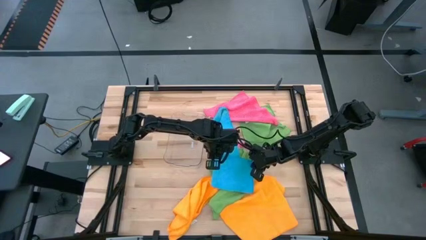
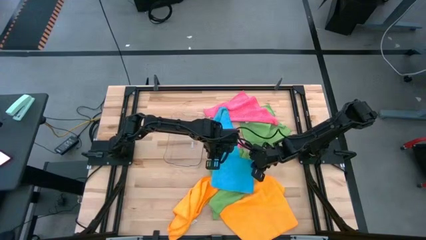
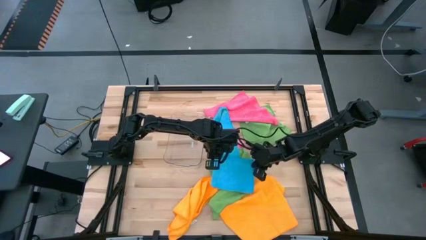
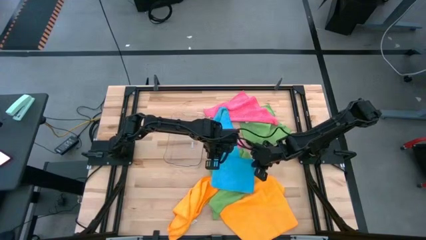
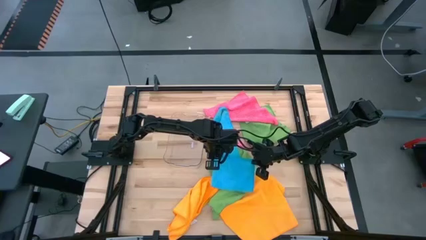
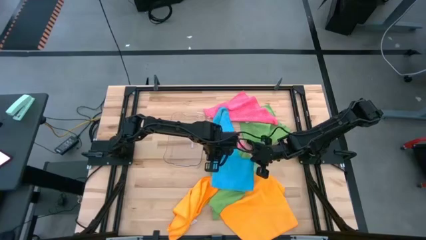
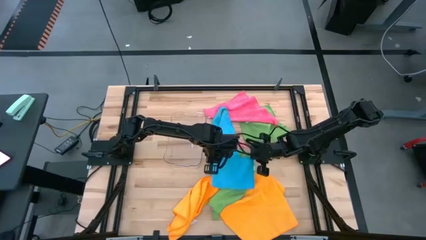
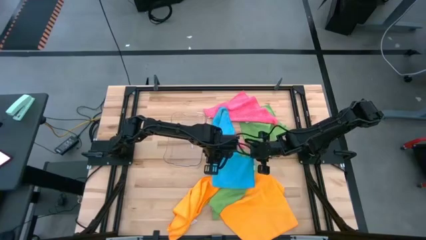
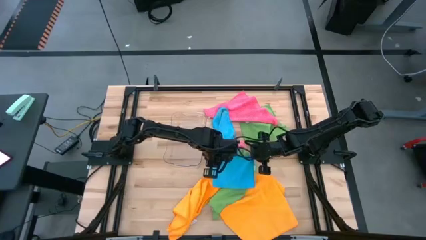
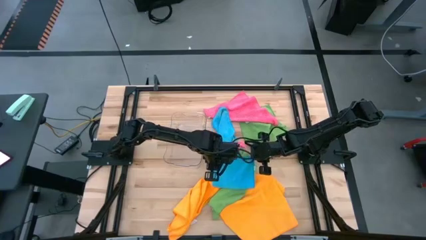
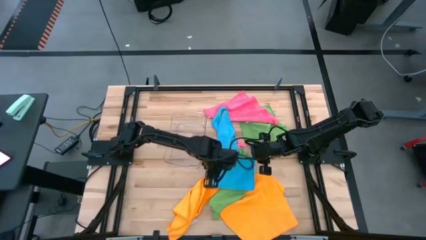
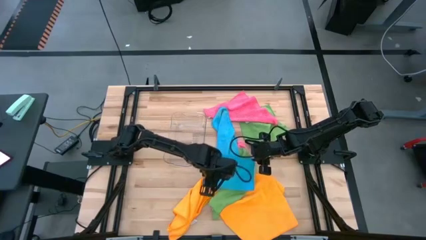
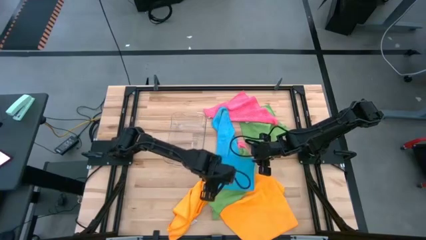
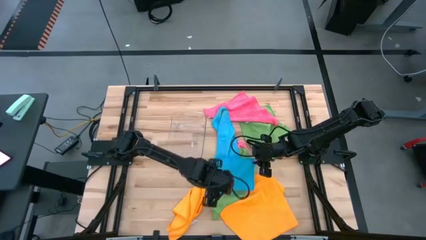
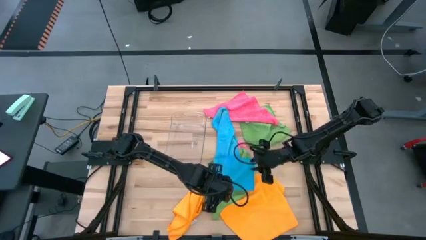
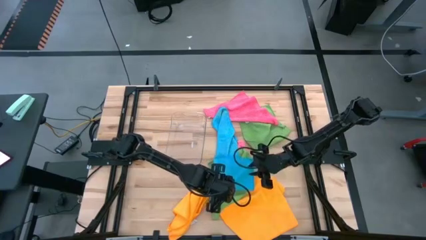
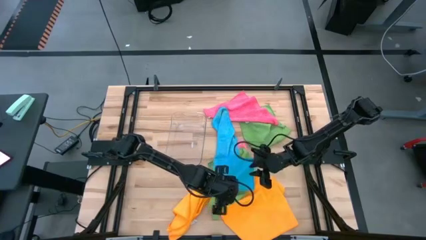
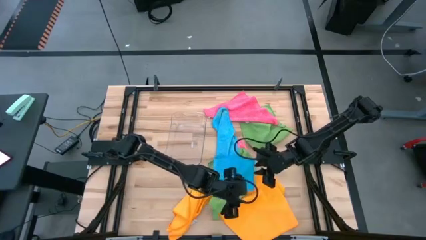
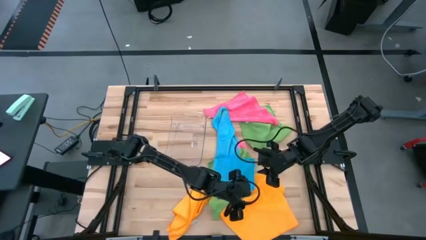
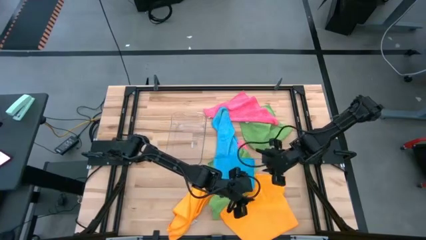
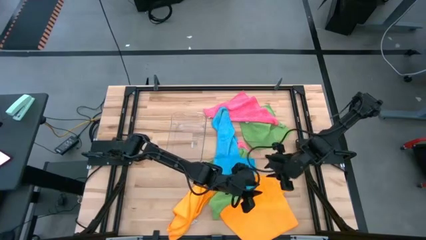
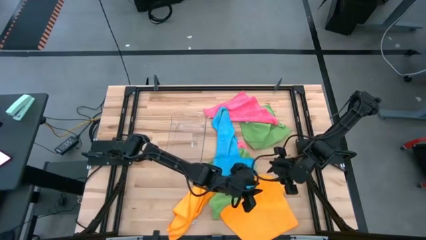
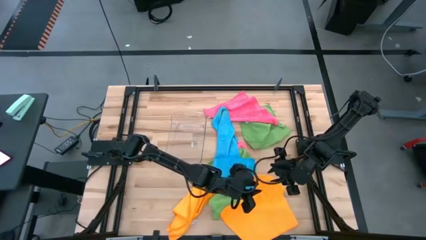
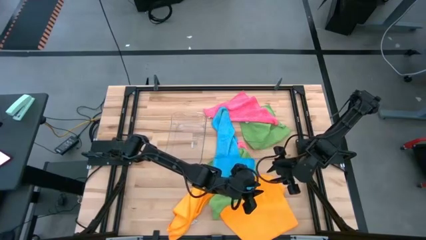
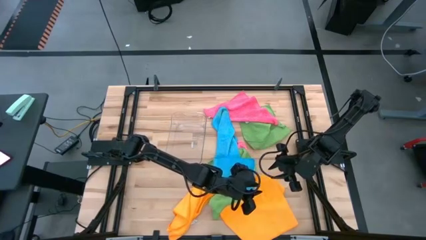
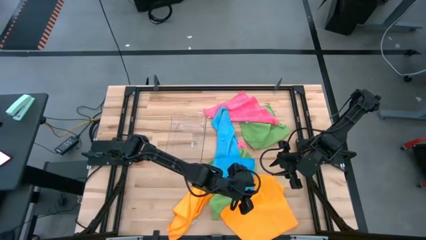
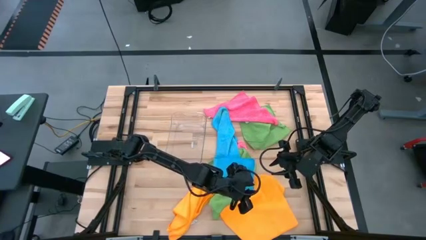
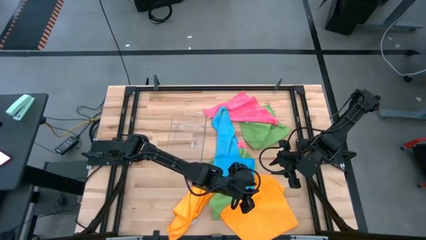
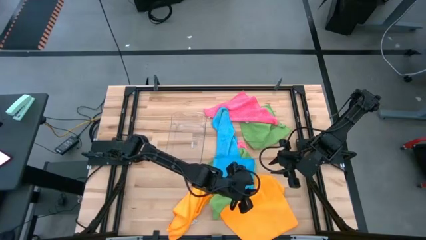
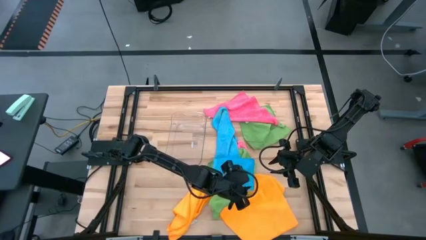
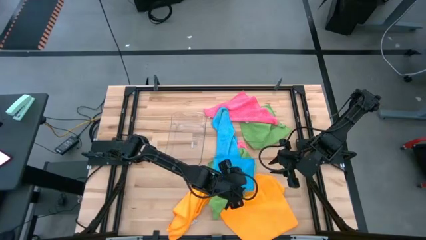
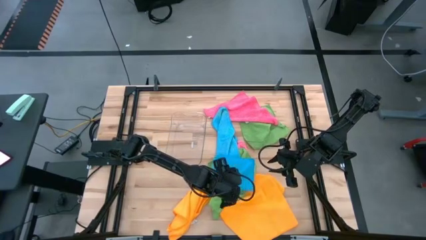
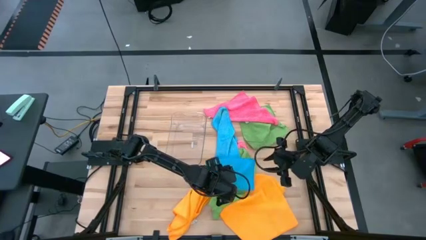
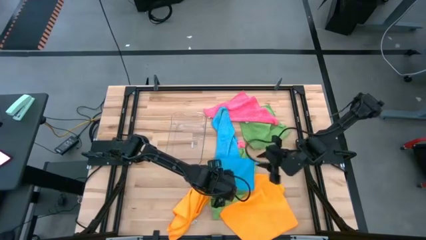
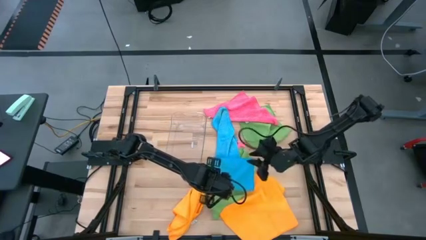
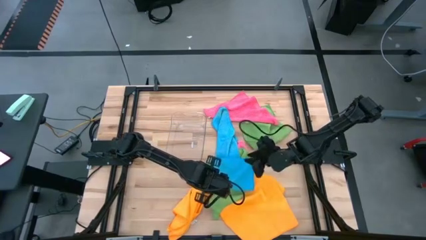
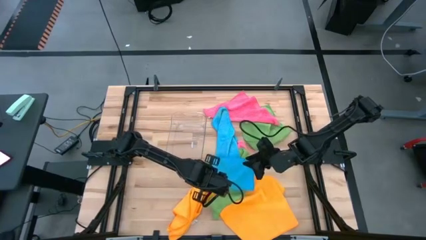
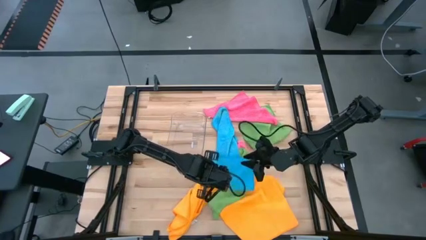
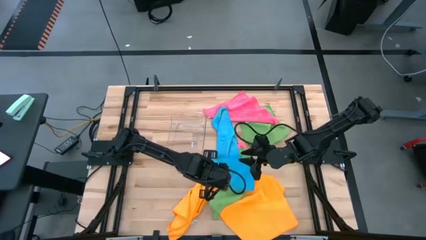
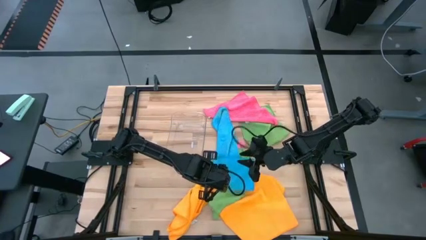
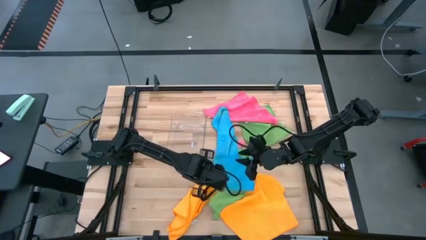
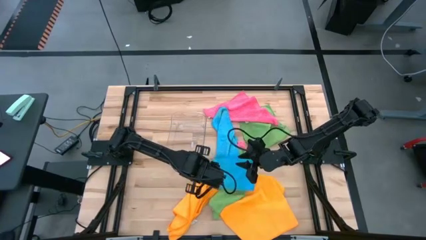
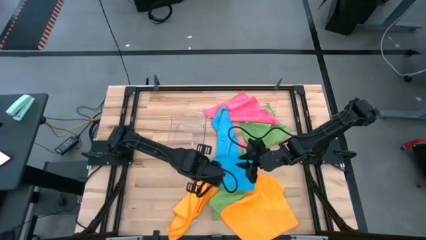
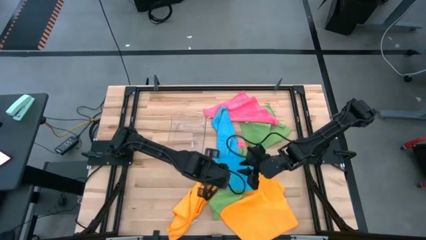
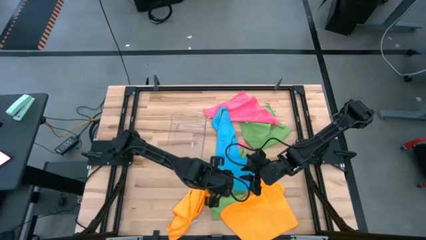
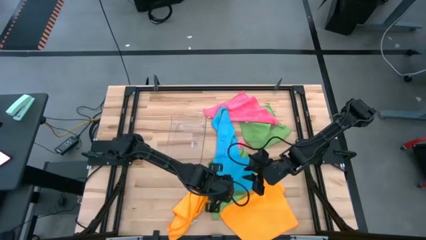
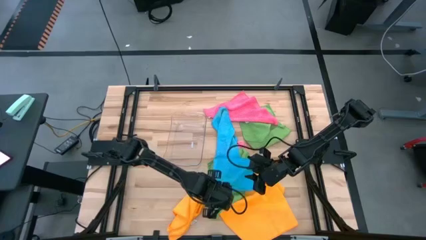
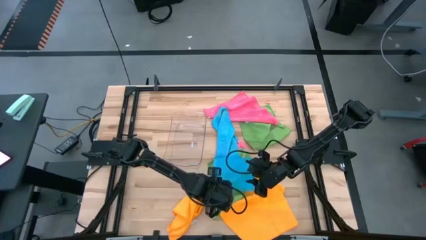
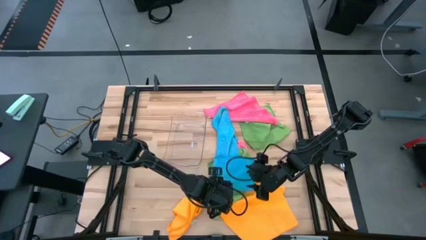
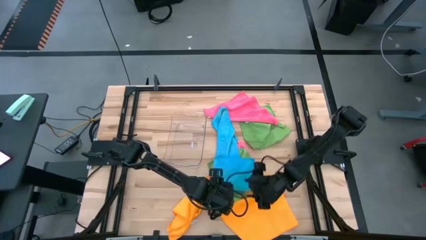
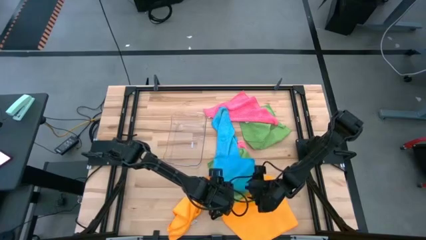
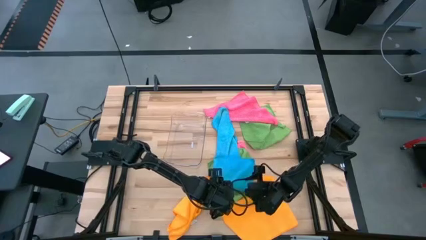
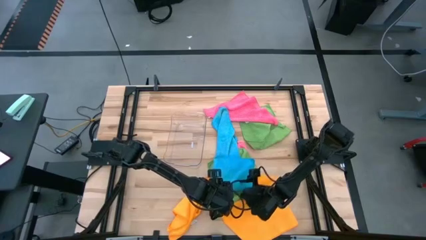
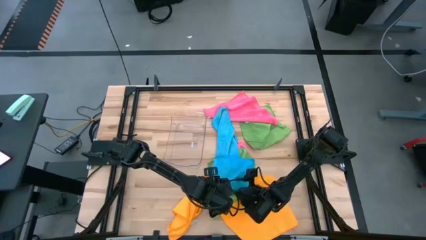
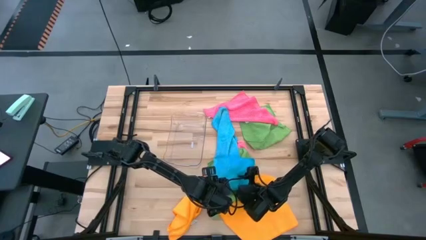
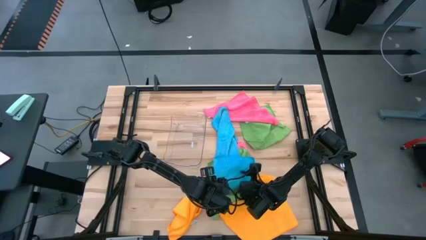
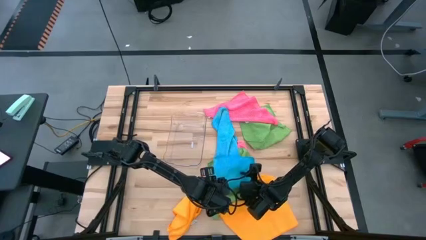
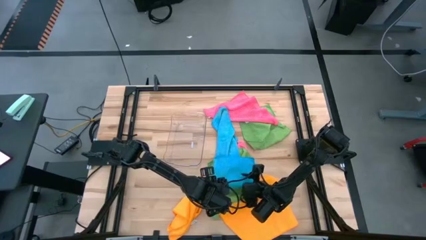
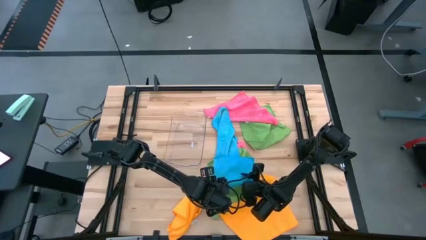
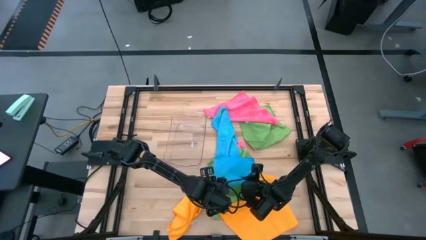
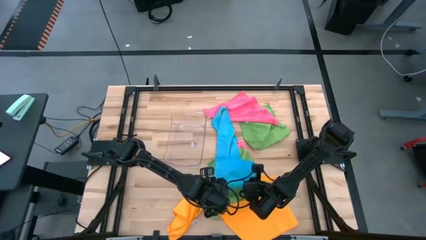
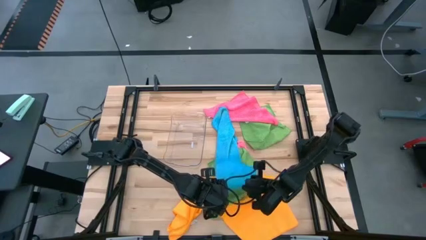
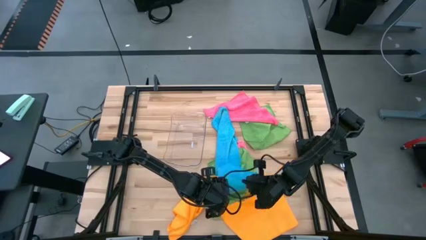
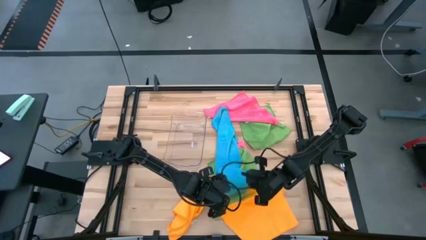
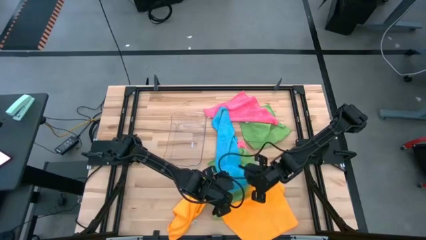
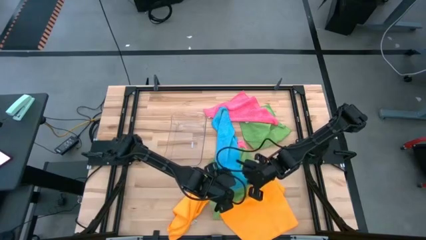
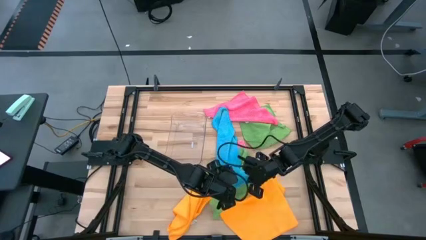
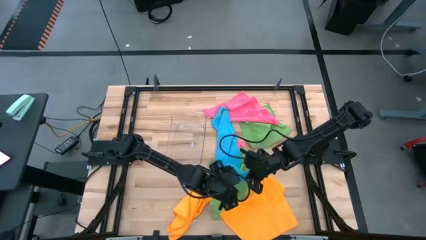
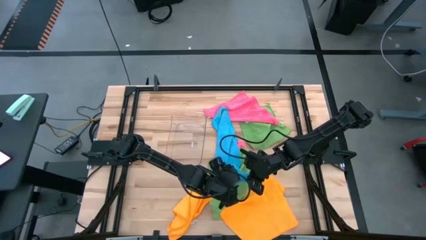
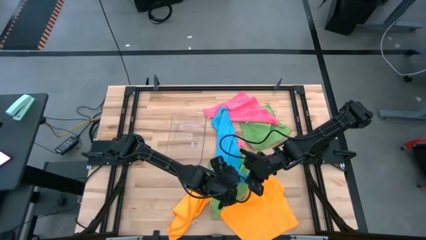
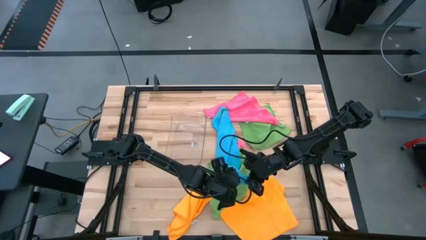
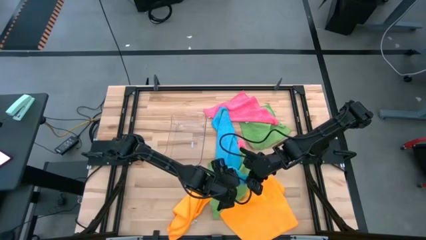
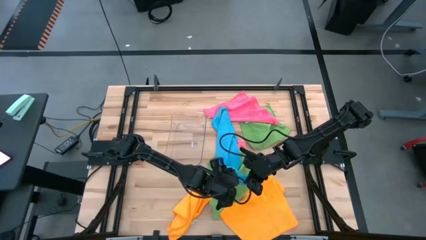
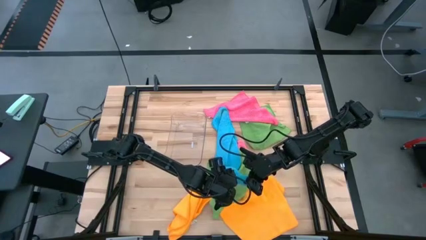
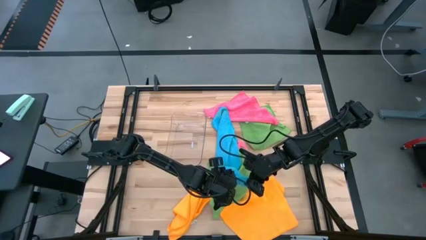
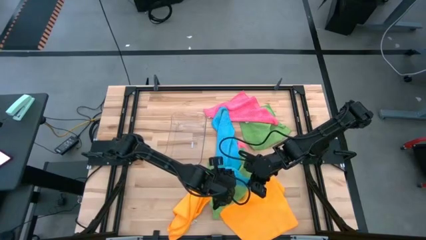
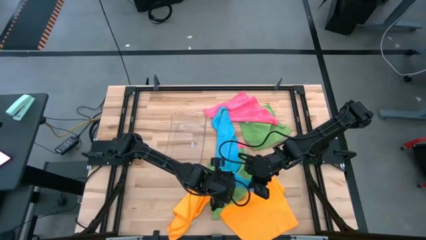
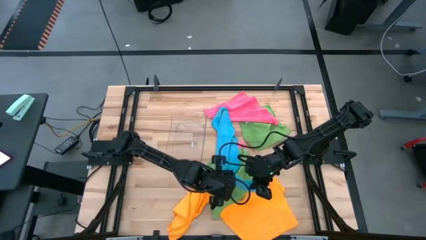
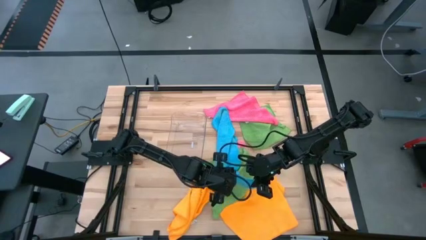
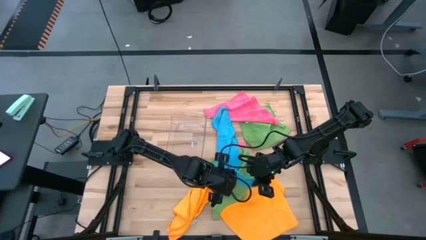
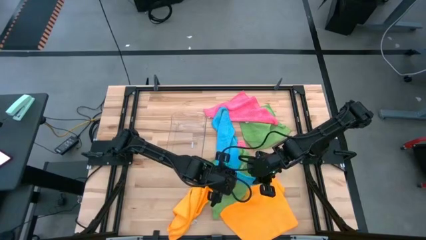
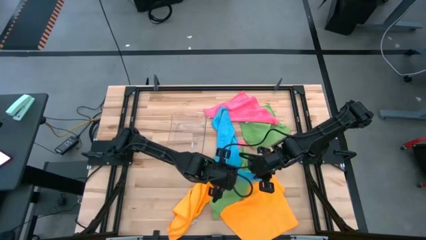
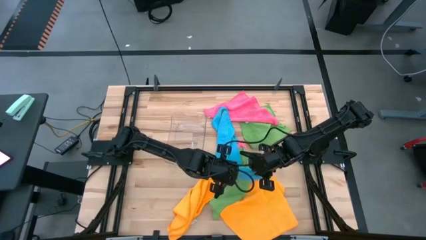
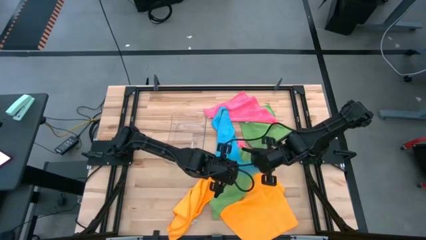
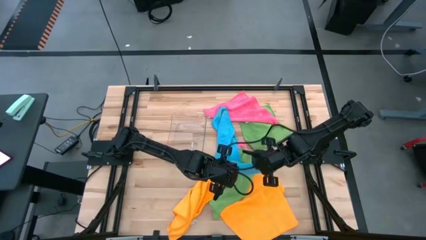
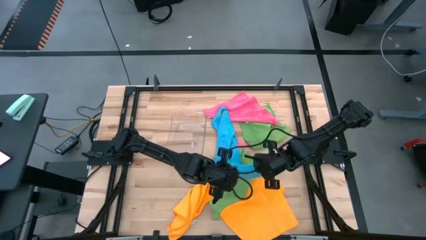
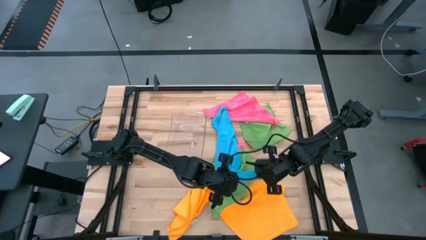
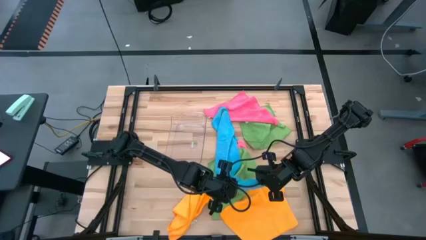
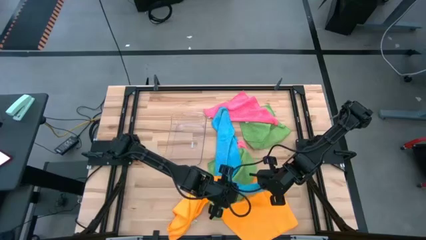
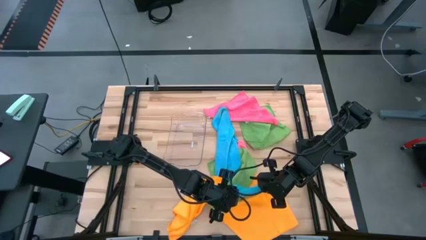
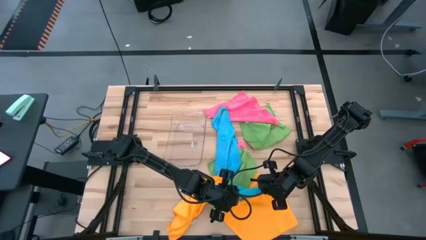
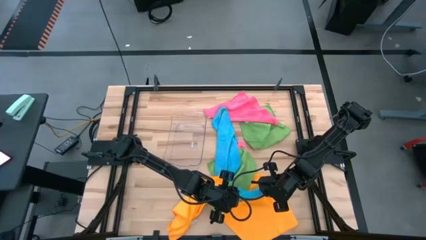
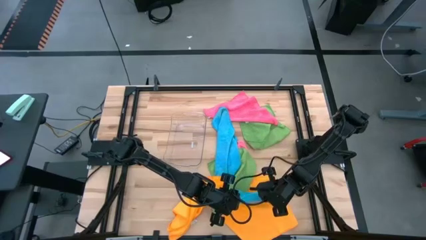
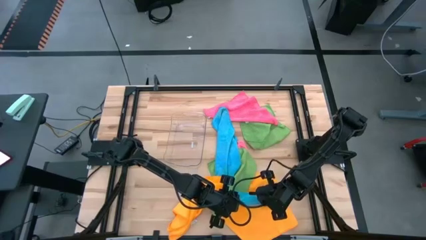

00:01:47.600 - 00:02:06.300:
Task: Fold microfiber towels
Fold the left blue towel
